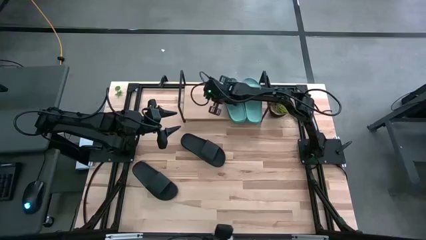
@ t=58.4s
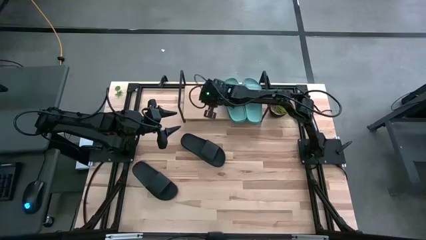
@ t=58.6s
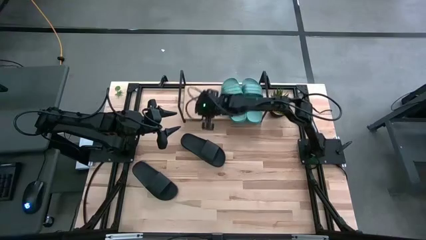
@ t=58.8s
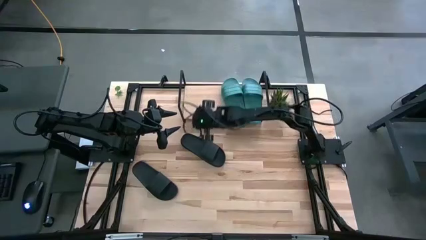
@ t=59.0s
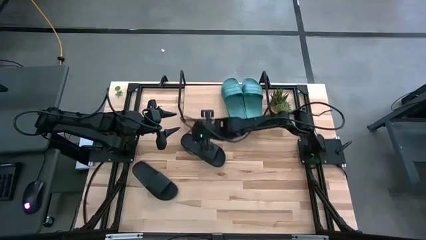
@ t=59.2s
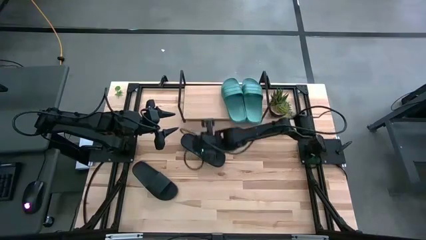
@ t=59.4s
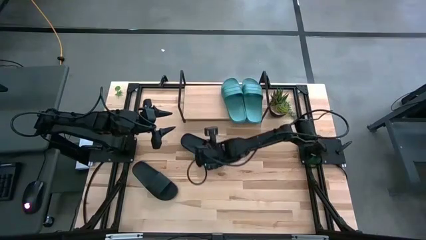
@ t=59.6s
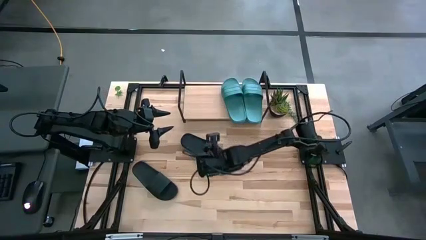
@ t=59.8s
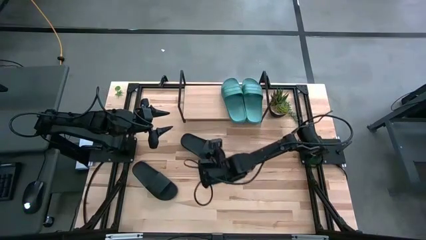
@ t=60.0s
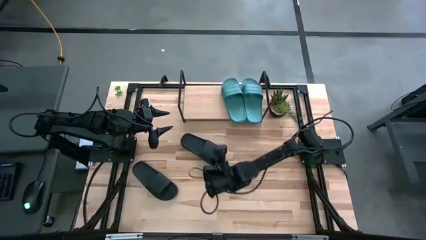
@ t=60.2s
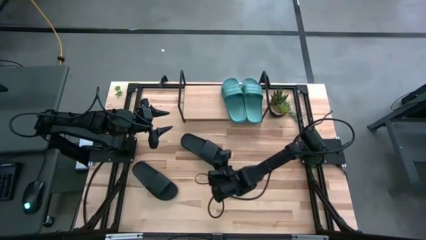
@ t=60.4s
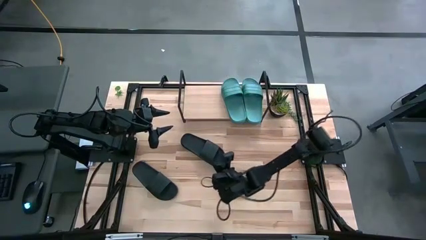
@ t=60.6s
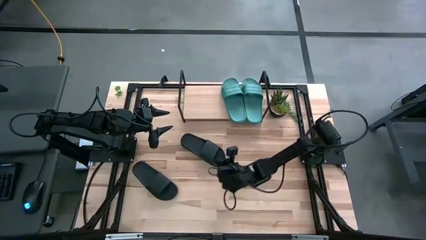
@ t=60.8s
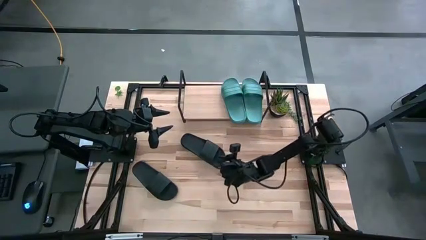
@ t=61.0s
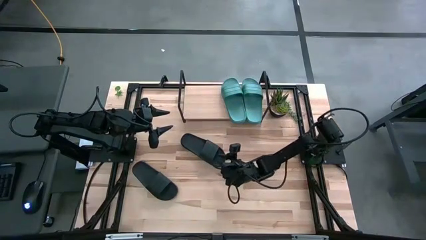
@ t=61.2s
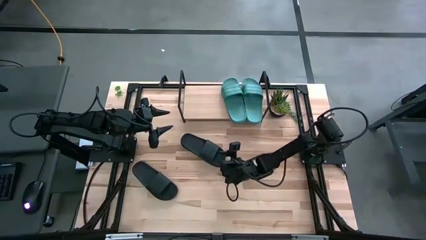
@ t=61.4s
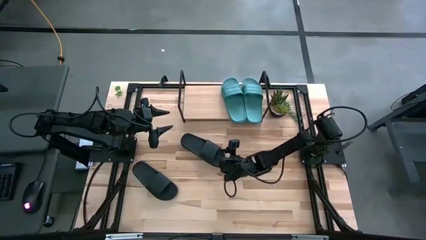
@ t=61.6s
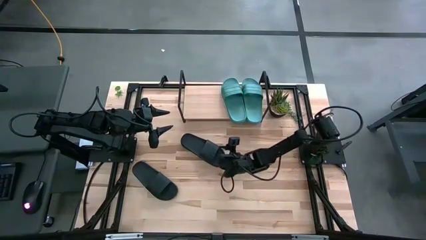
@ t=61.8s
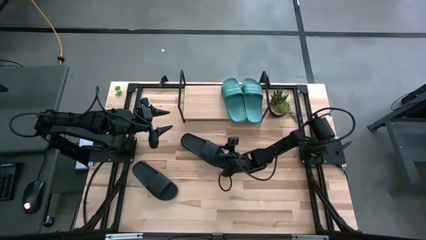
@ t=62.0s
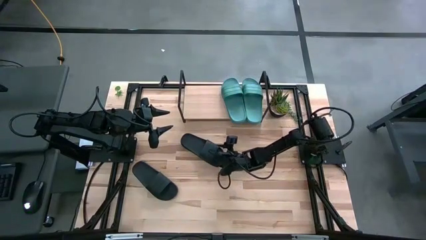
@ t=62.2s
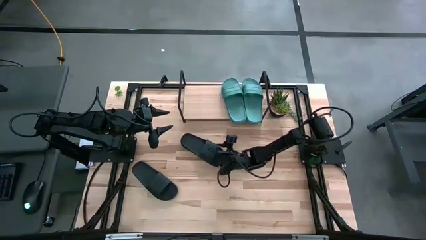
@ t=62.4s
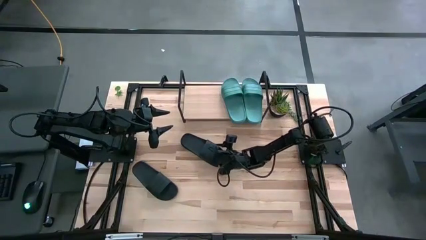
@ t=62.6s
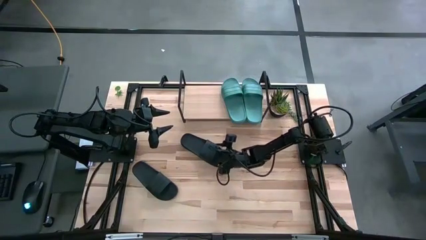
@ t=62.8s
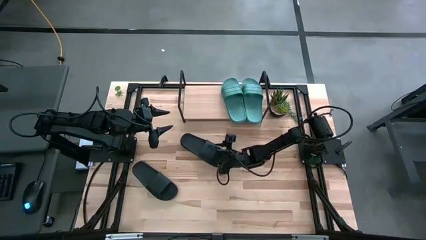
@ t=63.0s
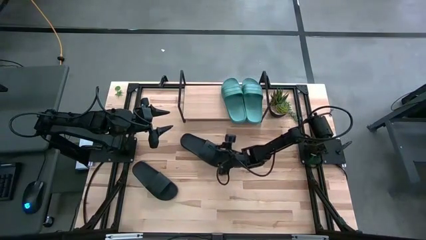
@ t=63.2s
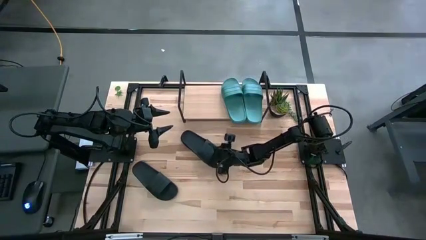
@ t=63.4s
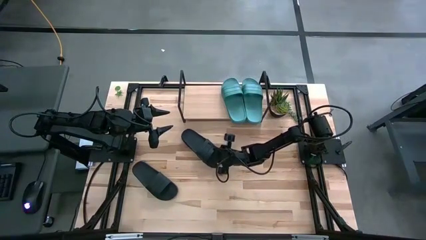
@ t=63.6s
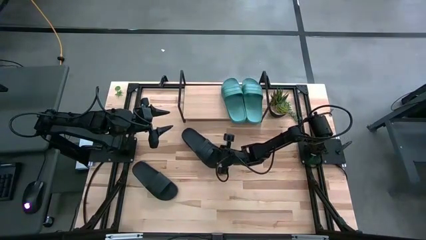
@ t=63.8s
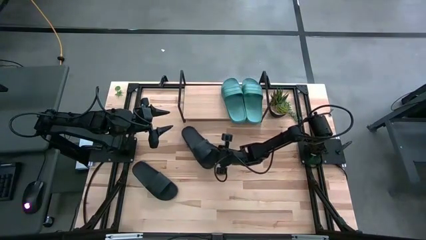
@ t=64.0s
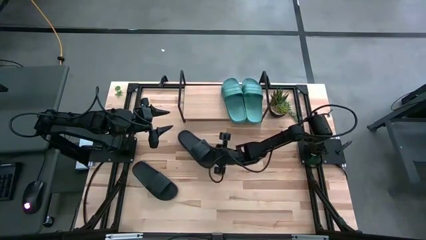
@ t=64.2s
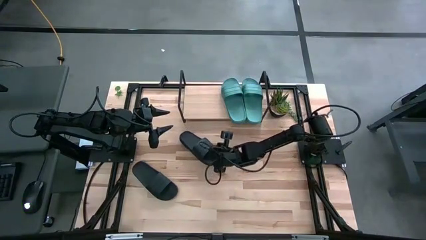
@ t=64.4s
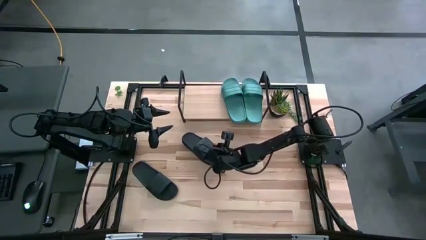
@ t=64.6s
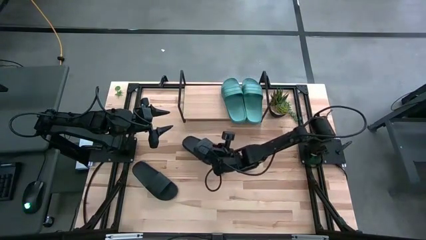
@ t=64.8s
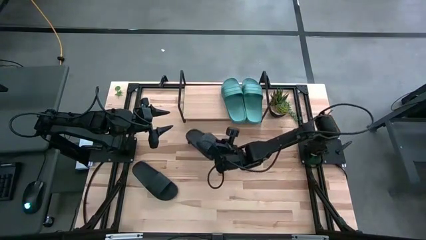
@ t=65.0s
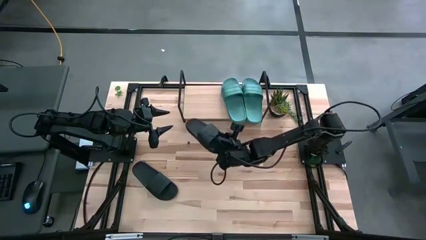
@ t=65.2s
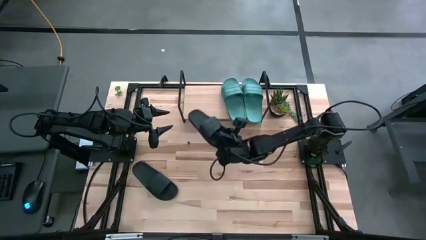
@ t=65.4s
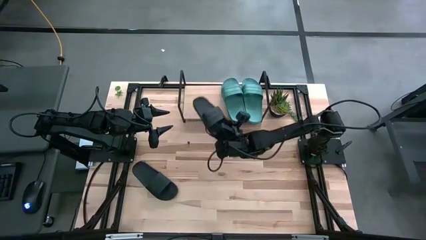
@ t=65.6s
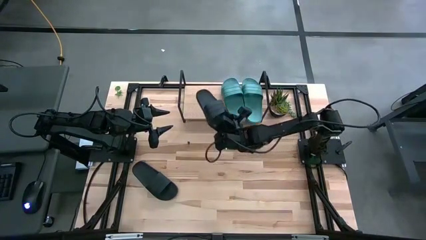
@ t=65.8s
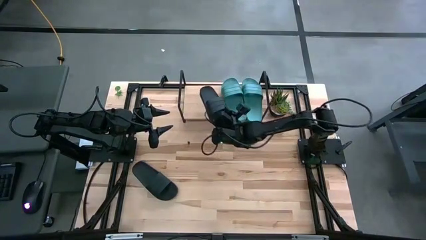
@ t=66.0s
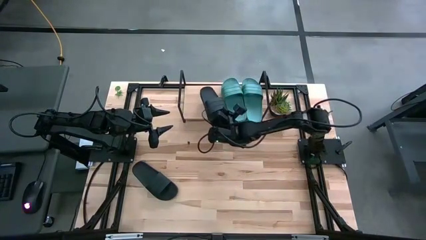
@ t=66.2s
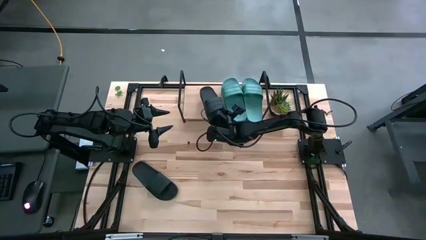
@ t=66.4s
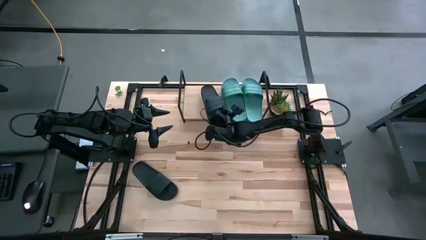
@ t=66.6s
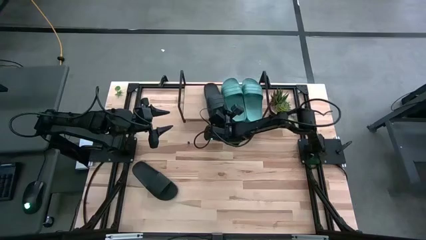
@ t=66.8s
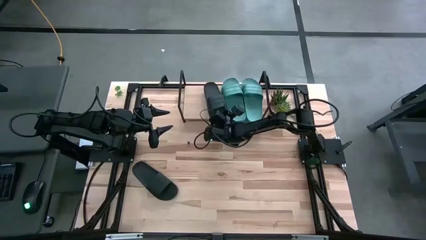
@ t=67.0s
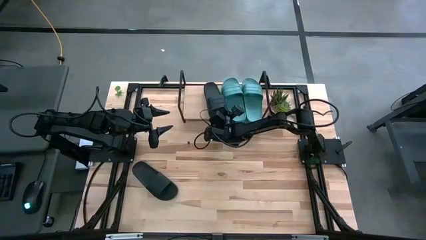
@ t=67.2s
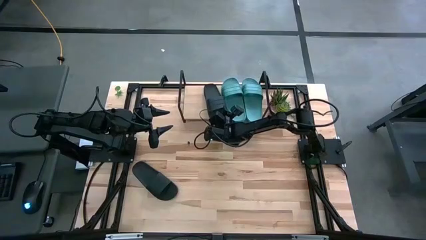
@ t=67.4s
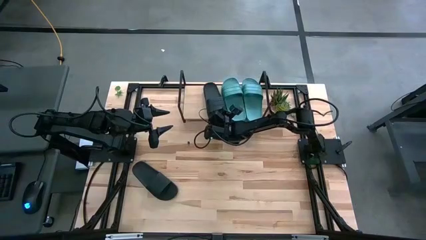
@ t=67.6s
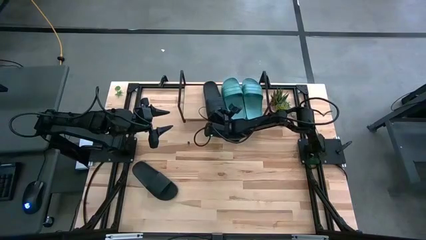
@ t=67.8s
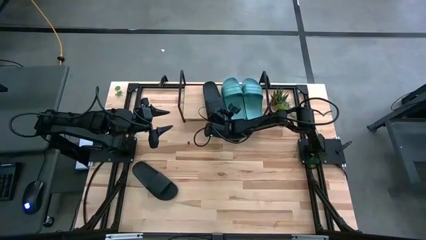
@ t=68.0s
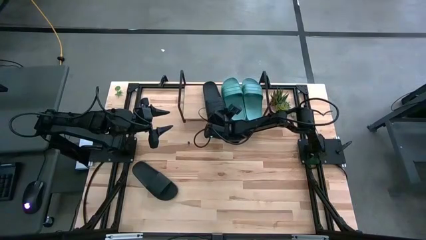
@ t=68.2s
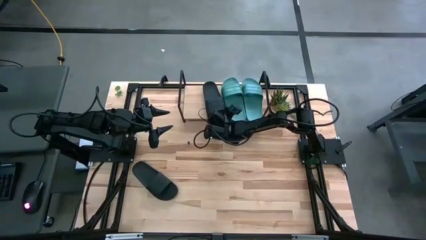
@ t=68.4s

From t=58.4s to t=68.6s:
Task: Pick and place slides into the shelf
Put the right black slipper on the shelf
